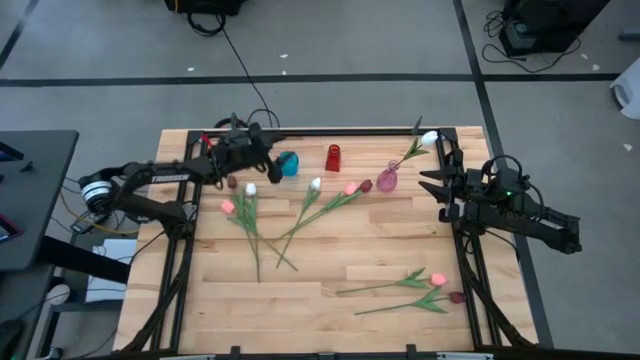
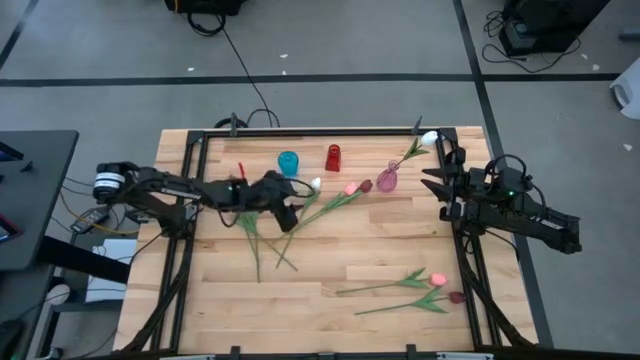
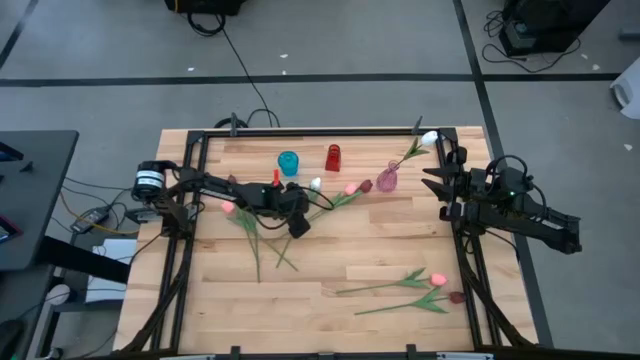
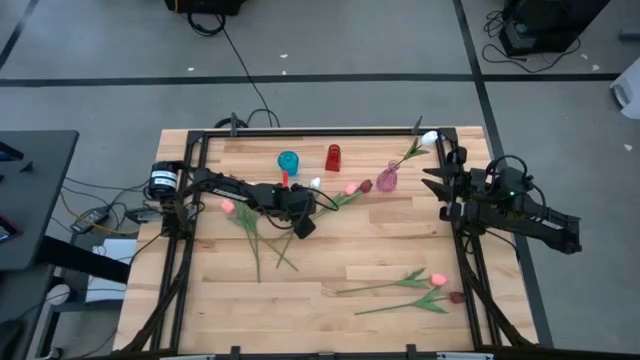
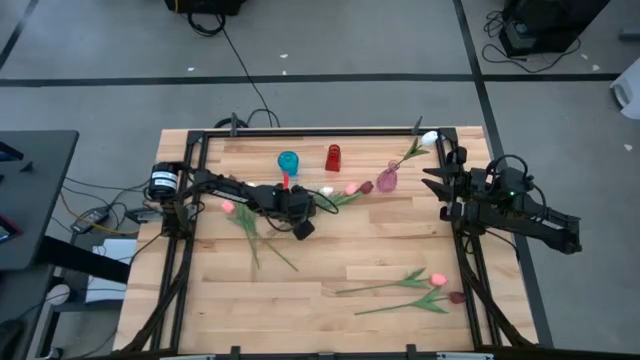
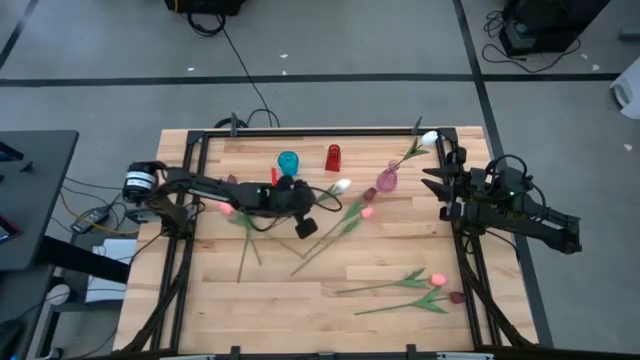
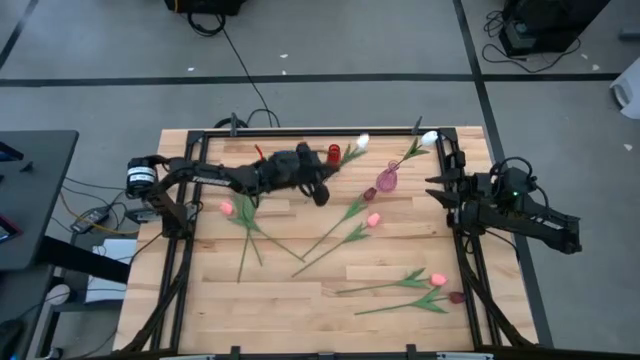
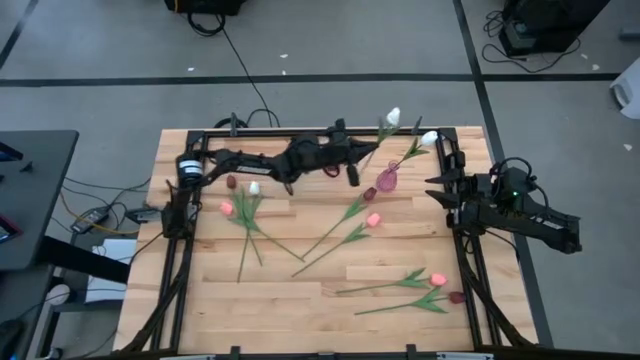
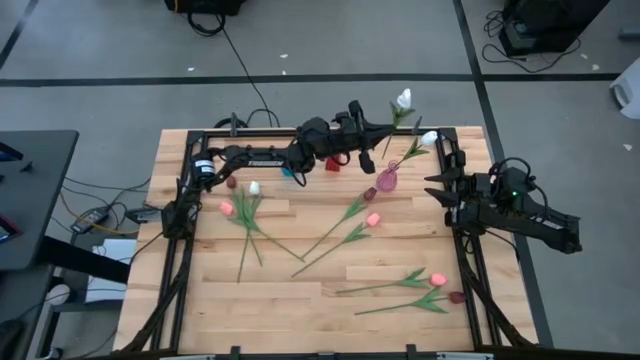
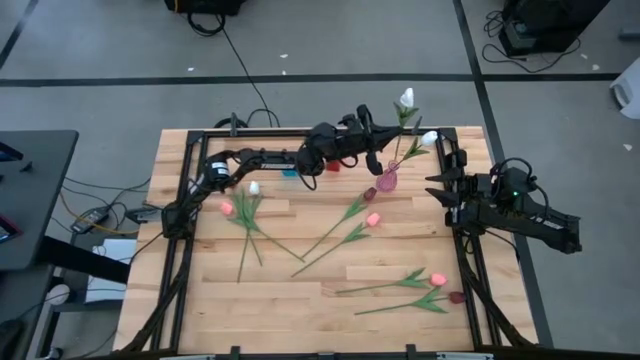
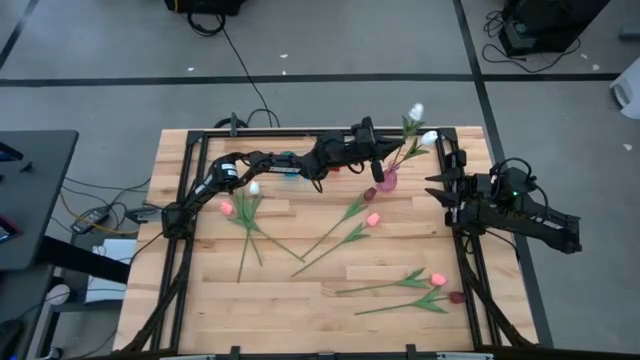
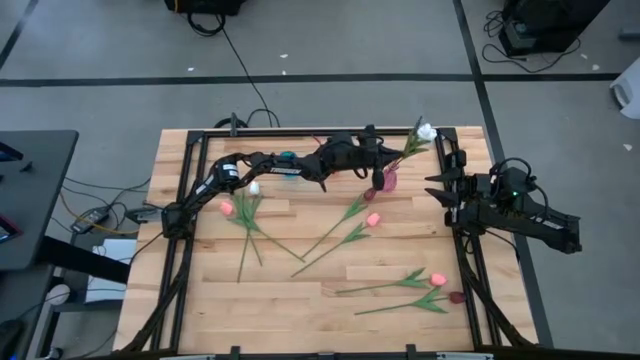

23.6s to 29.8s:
Task: Sort flowers into vase by color
Put the right white tulip into the pink vase

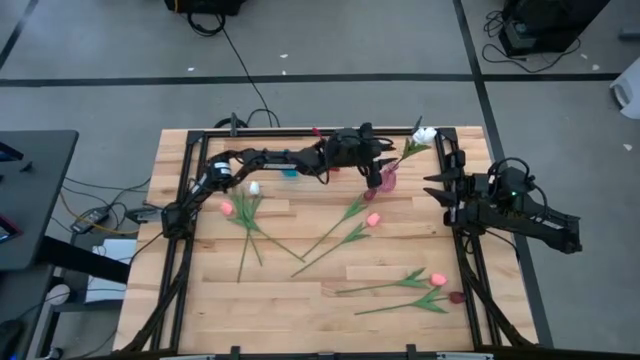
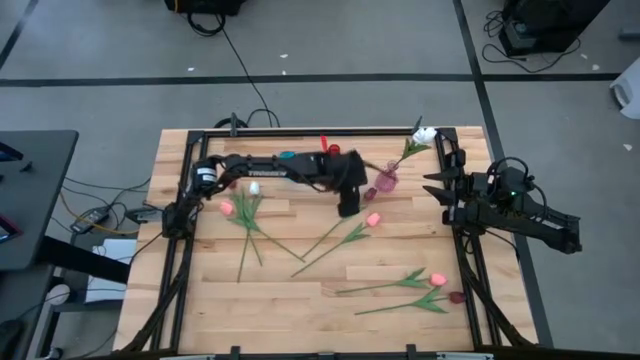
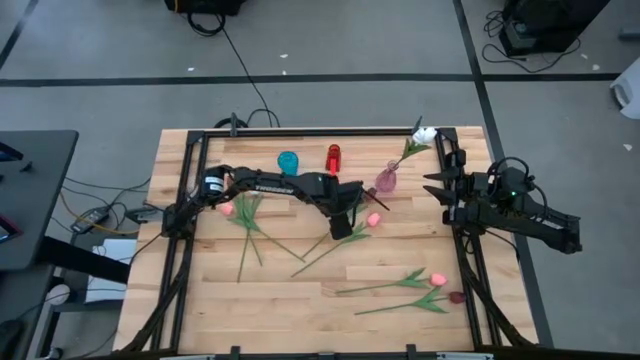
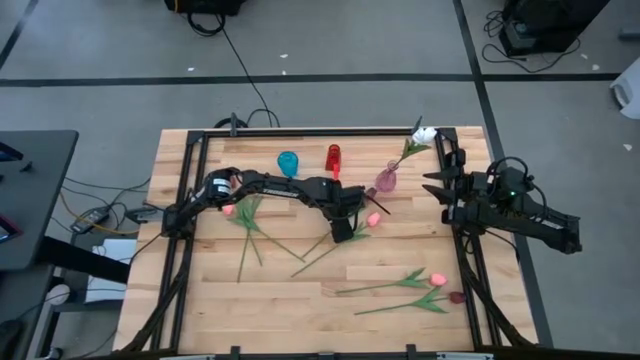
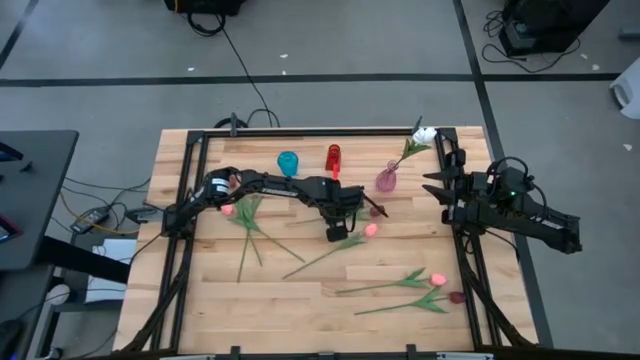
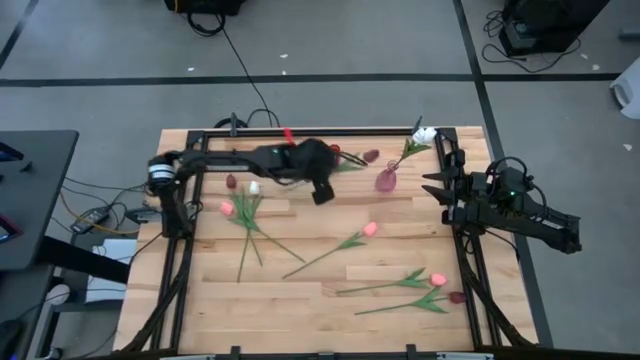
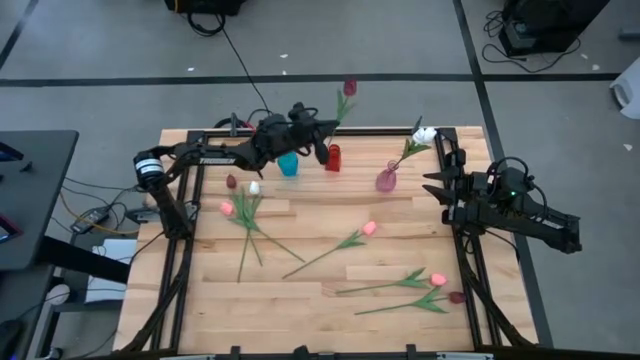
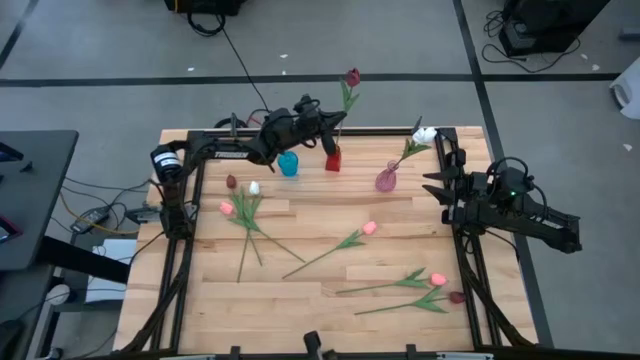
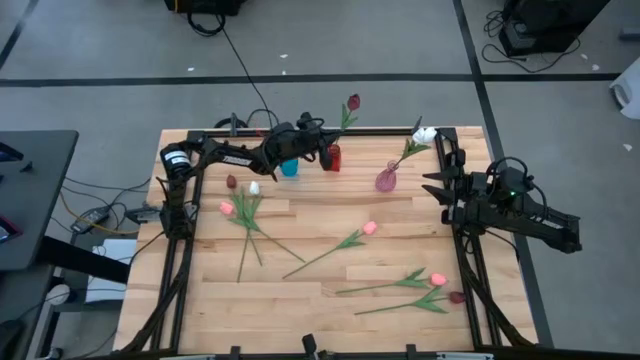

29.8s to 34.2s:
Put the right red tulip into the red vase

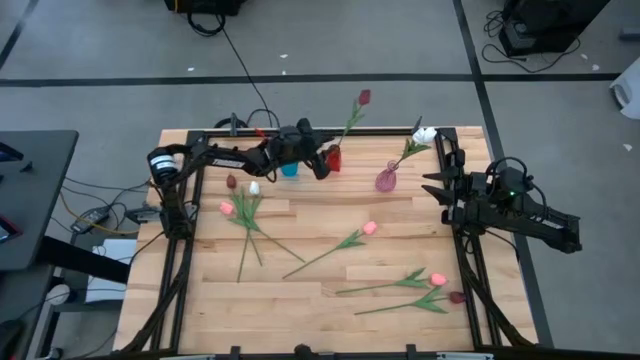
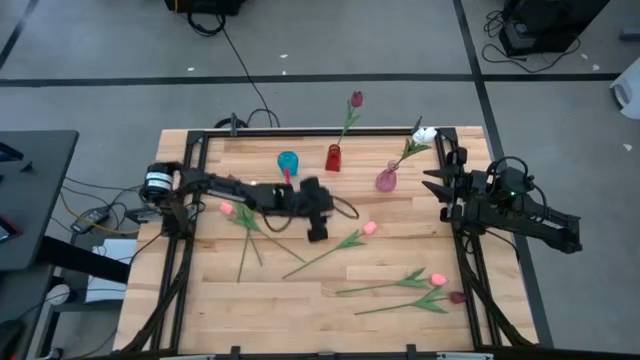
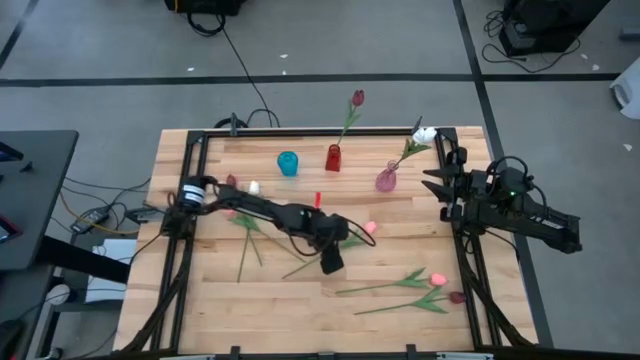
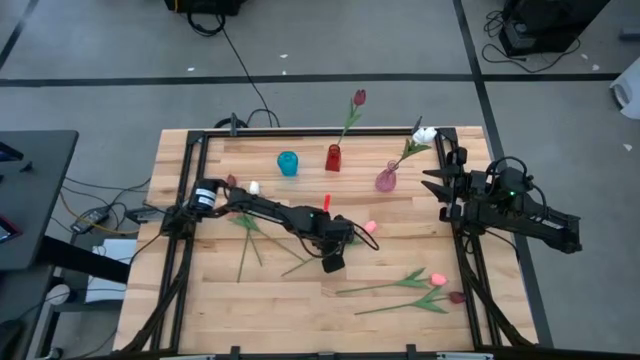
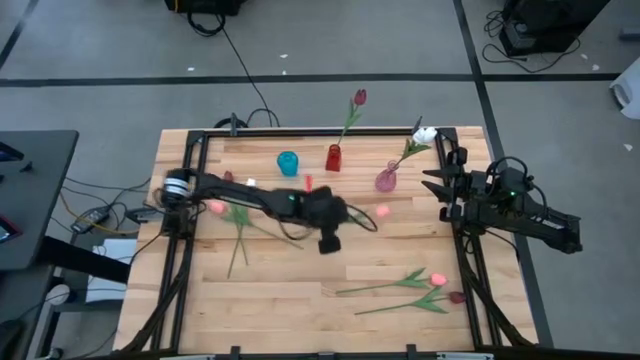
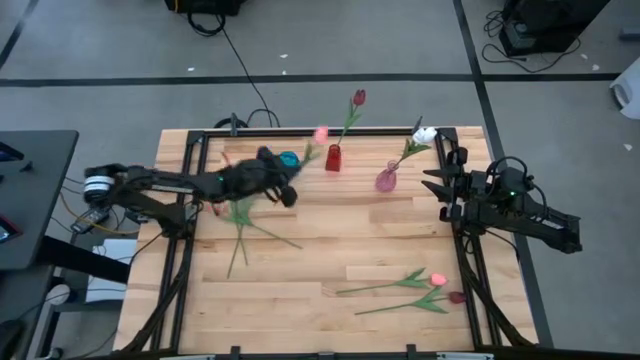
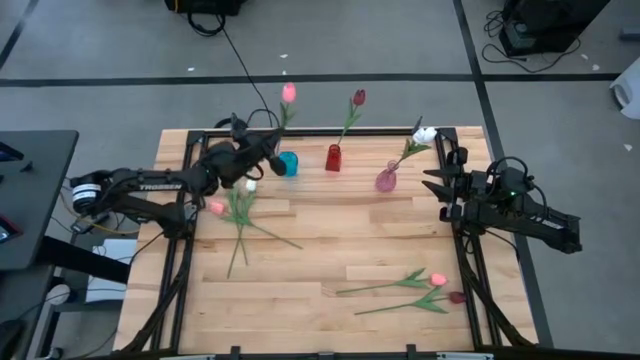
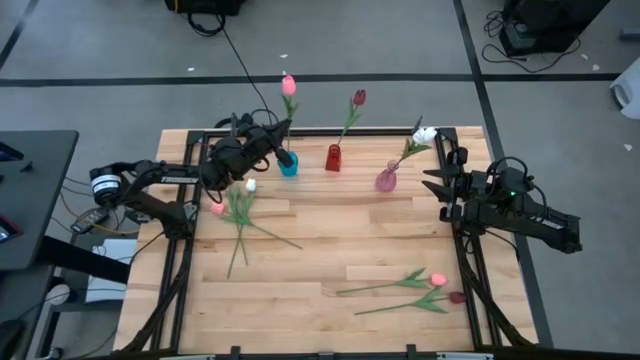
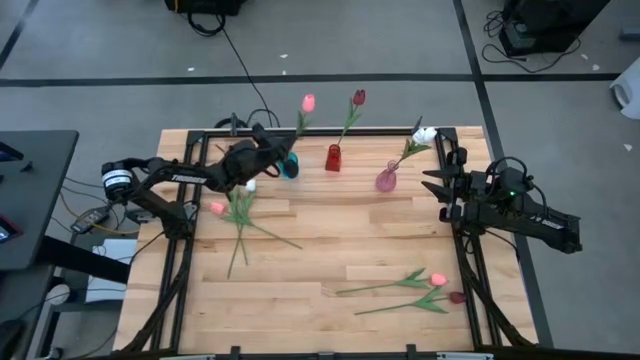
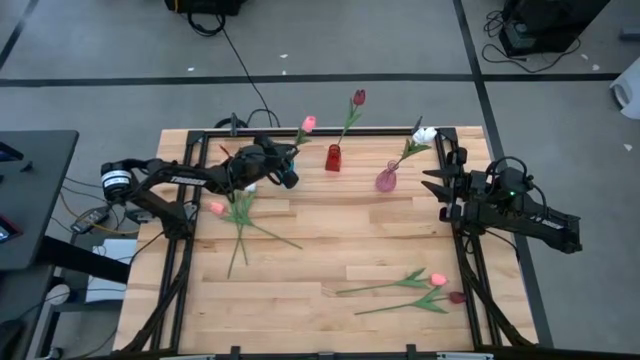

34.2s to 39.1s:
Put the right pink tulip into the blue vase

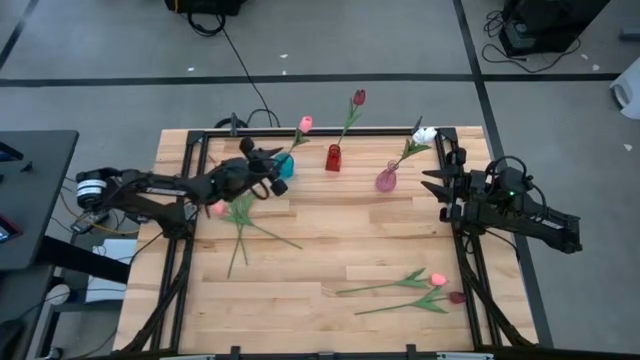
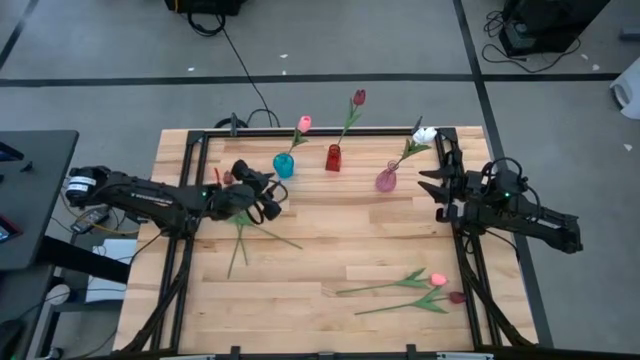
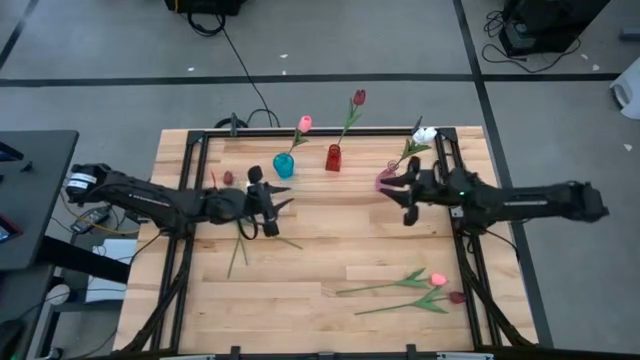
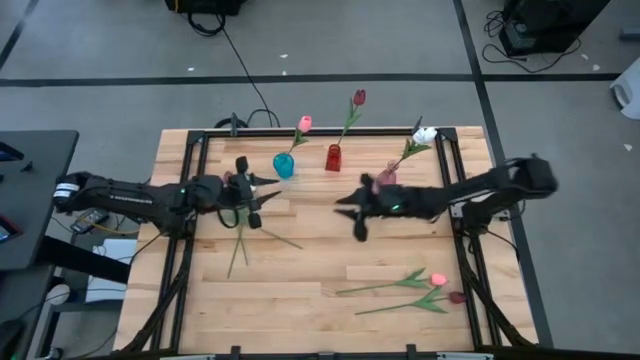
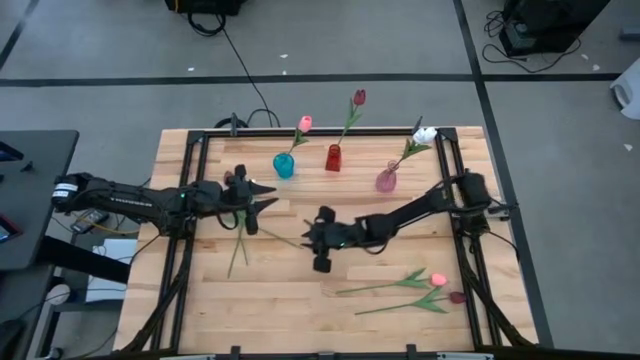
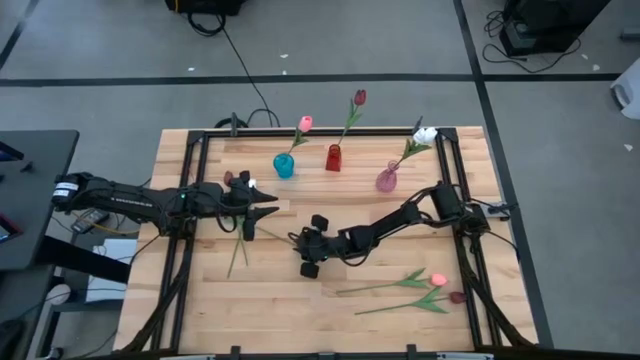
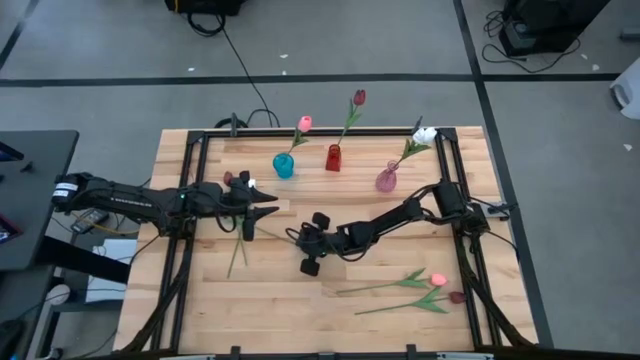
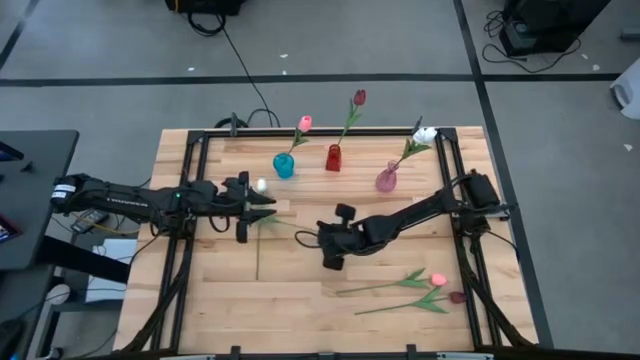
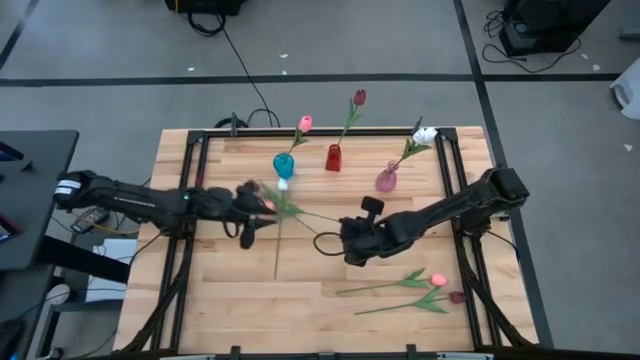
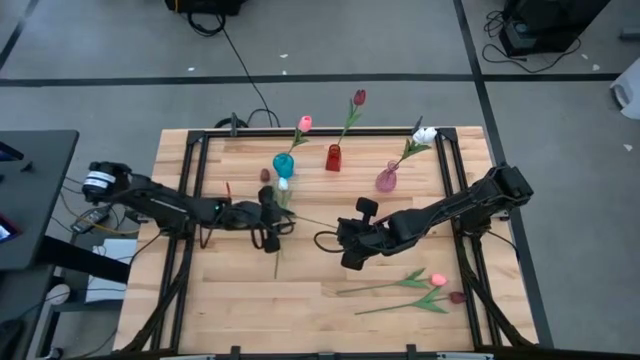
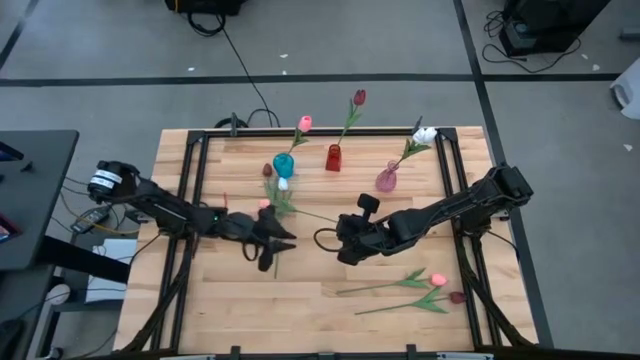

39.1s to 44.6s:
Put the top pink tulip into the blue vase
